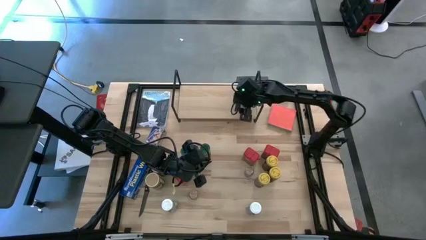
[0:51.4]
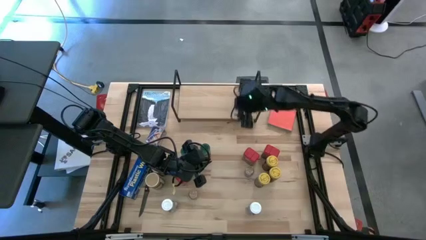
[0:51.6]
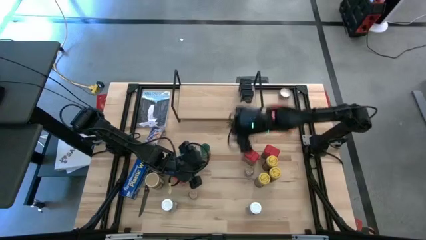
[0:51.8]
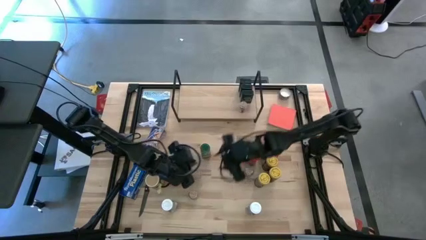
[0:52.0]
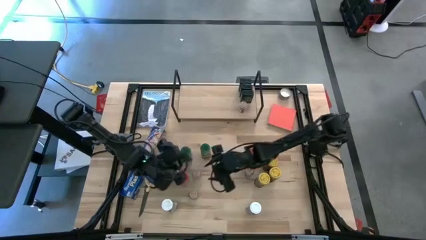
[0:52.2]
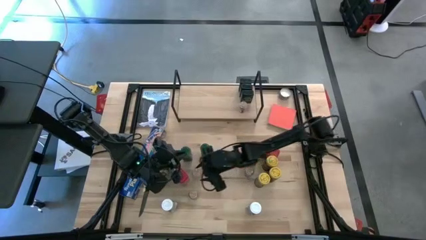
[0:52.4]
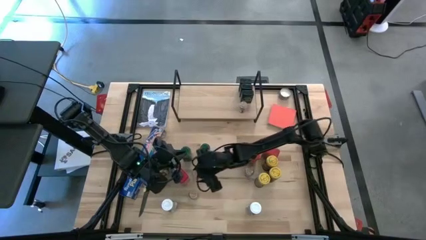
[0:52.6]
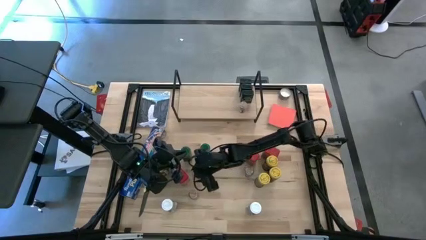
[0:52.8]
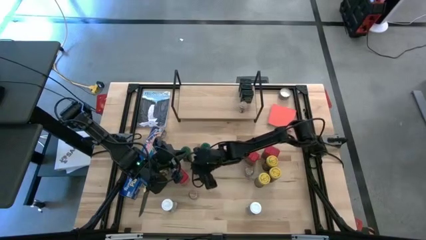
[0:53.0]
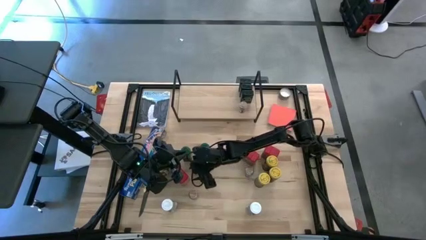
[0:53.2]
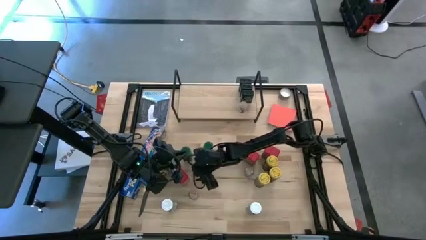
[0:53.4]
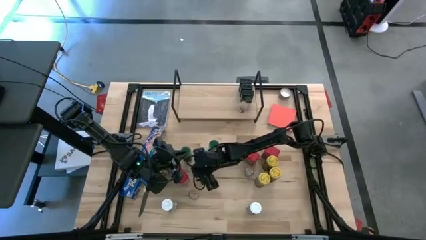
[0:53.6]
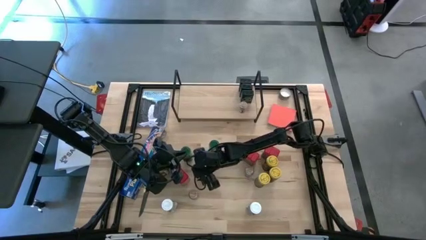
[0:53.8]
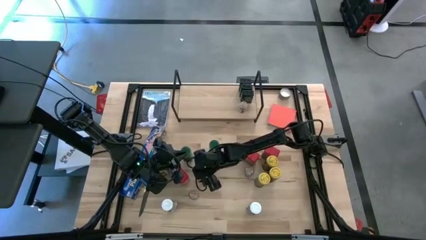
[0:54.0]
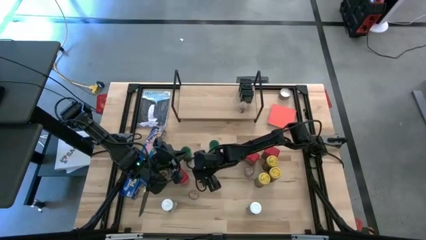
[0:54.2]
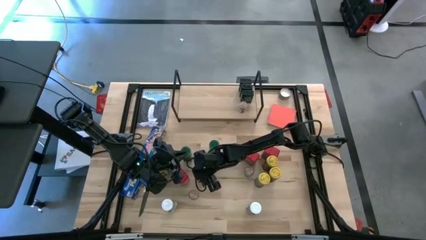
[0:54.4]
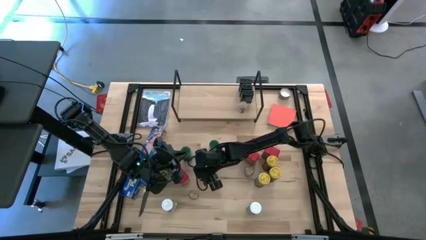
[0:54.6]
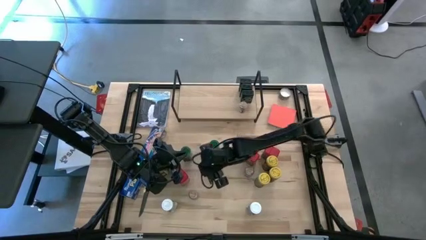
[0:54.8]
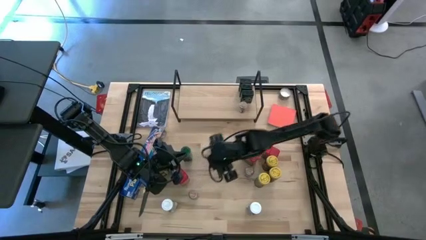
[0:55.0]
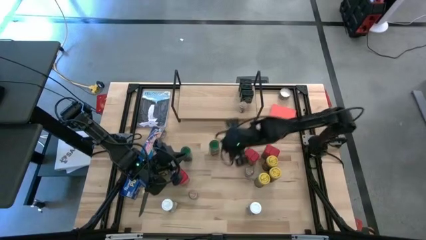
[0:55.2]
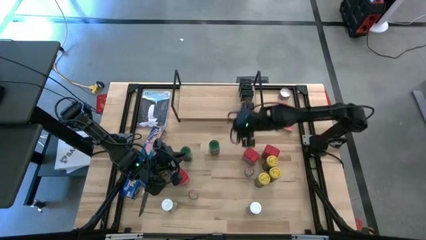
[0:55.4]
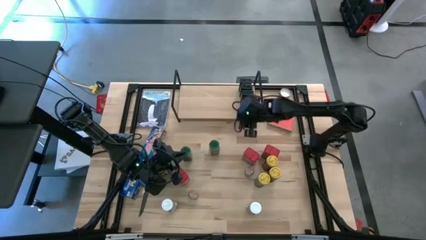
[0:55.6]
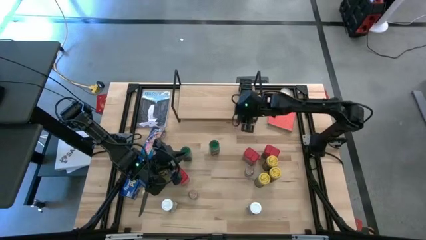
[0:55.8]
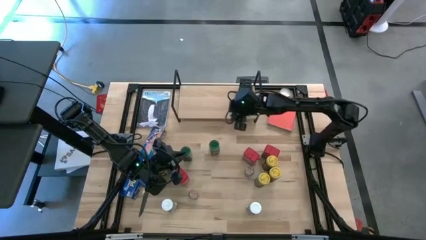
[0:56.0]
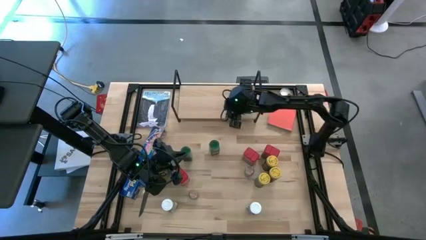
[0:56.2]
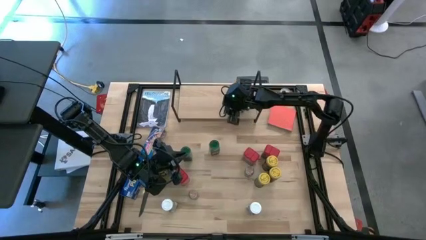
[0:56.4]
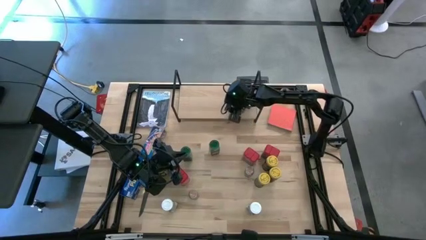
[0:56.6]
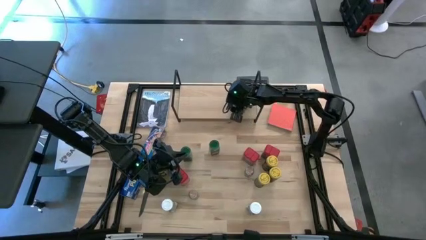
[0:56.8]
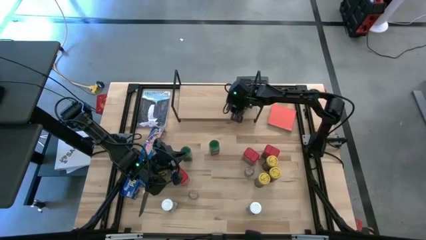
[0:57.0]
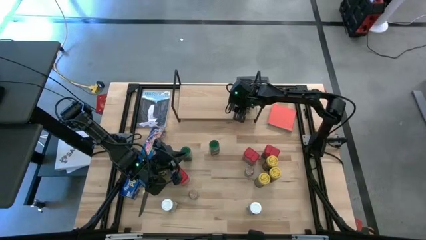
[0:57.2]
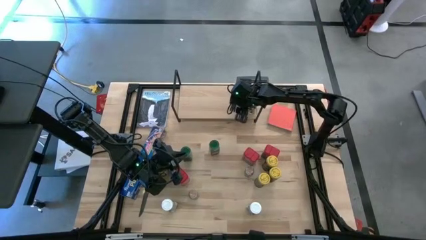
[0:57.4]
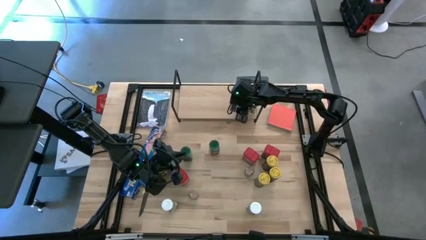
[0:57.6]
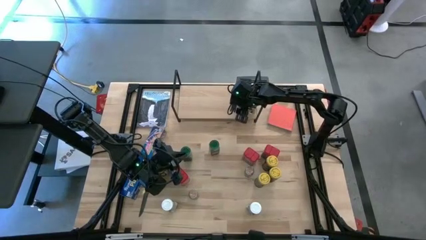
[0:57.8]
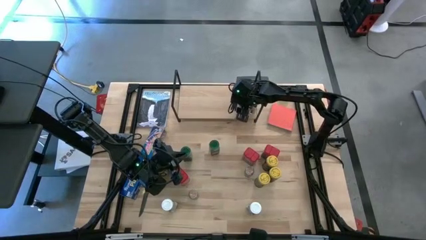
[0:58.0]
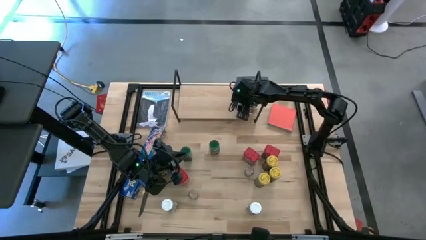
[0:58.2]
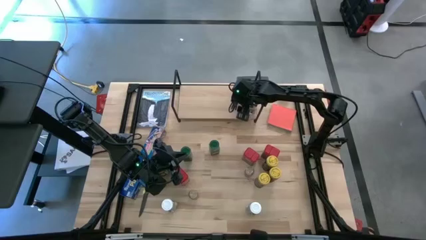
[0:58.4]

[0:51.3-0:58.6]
Task: Shelf spices
Put the transparent seasoning bottle on the shelf

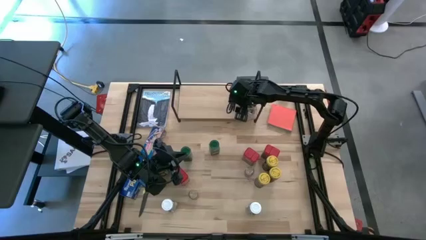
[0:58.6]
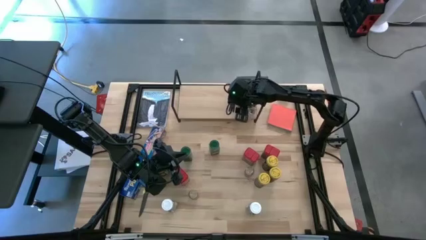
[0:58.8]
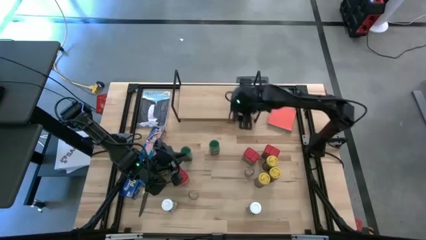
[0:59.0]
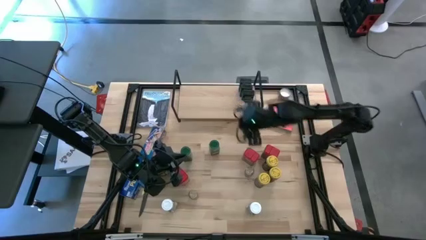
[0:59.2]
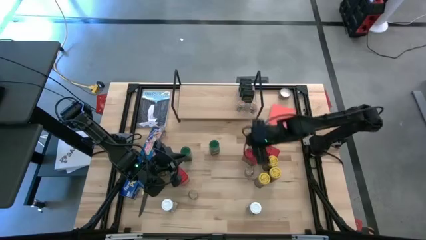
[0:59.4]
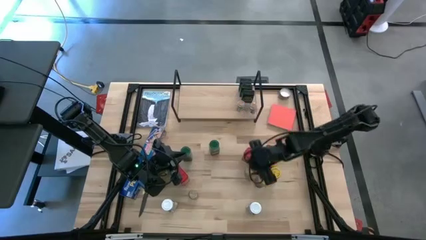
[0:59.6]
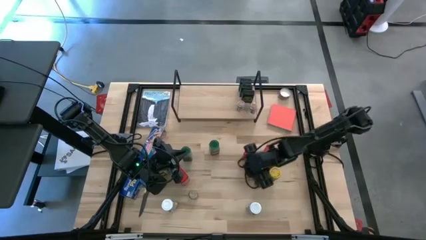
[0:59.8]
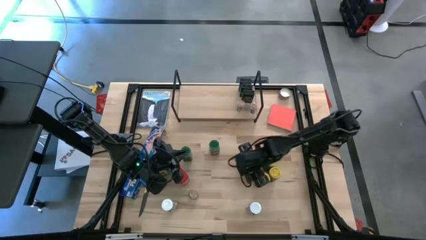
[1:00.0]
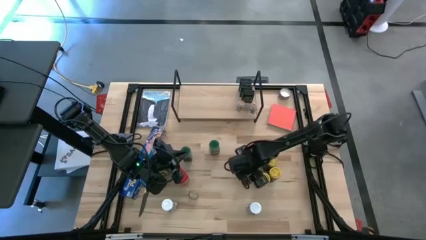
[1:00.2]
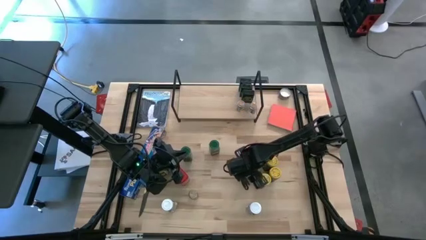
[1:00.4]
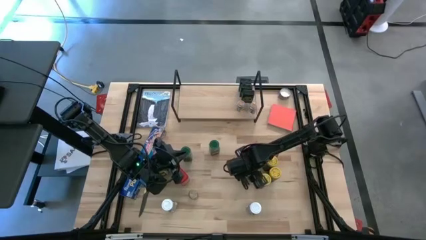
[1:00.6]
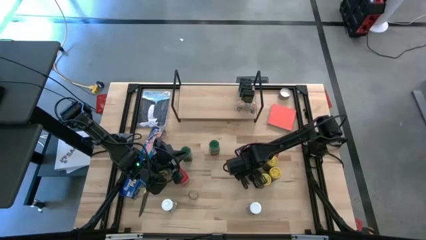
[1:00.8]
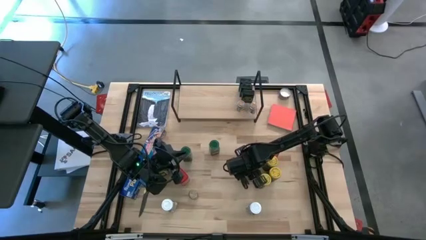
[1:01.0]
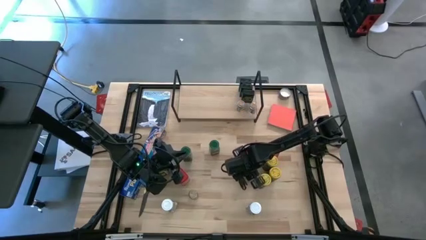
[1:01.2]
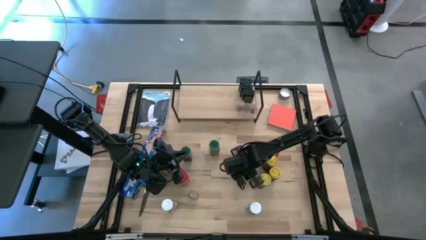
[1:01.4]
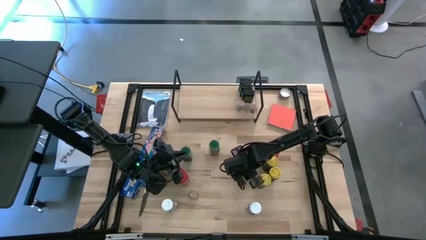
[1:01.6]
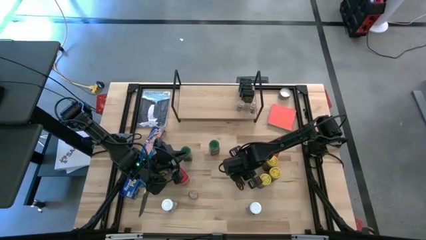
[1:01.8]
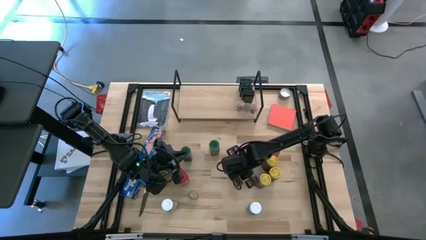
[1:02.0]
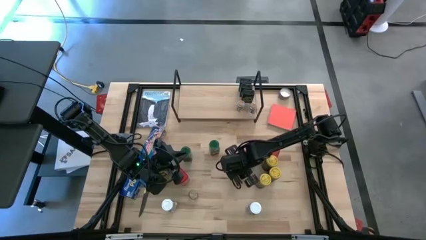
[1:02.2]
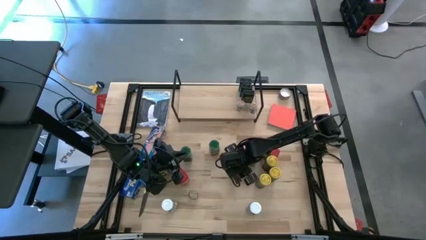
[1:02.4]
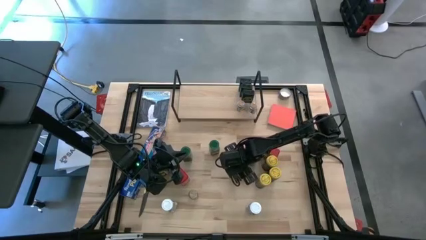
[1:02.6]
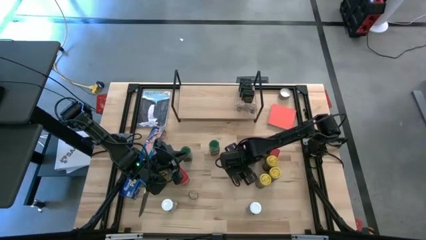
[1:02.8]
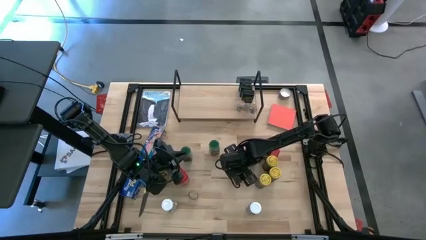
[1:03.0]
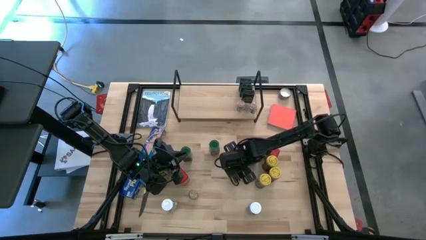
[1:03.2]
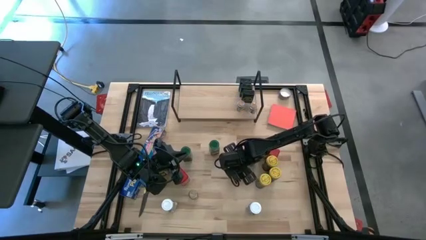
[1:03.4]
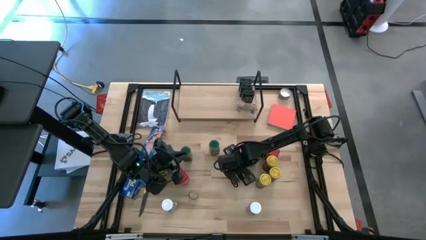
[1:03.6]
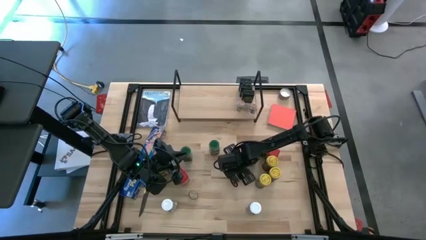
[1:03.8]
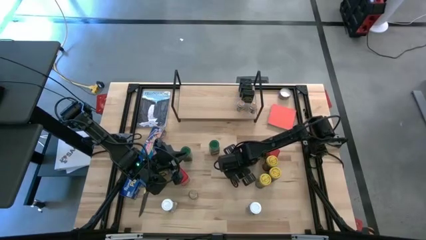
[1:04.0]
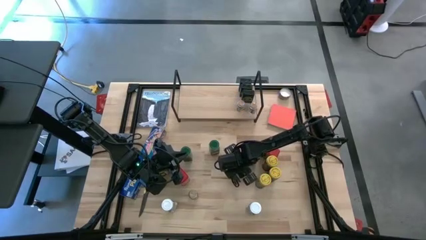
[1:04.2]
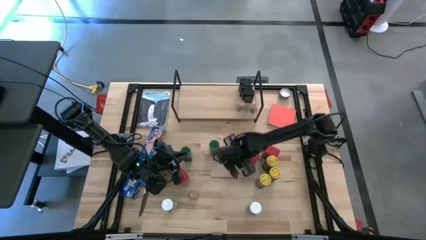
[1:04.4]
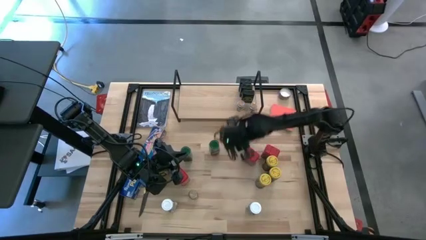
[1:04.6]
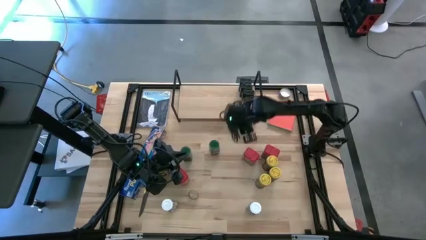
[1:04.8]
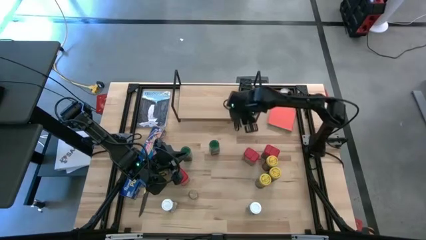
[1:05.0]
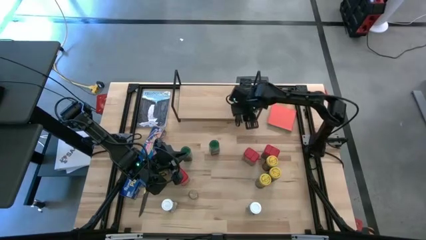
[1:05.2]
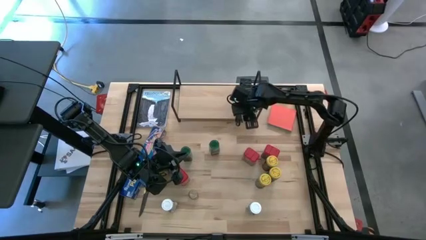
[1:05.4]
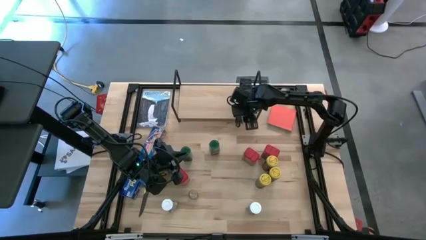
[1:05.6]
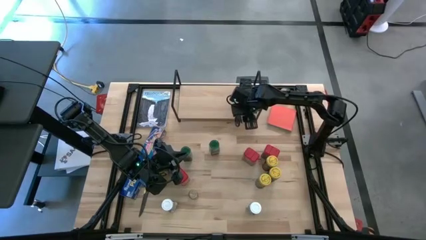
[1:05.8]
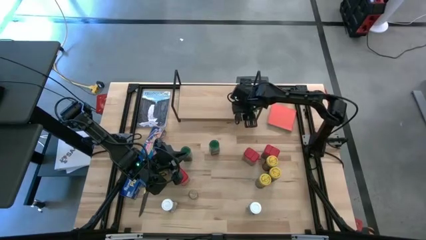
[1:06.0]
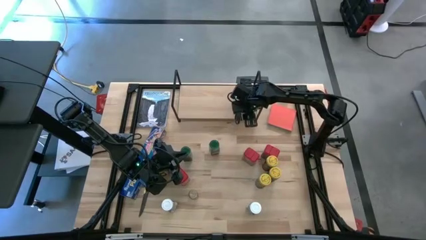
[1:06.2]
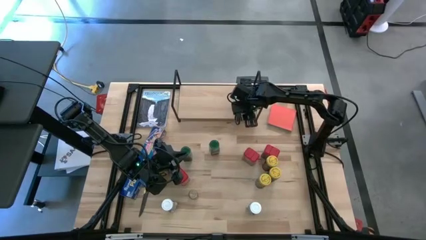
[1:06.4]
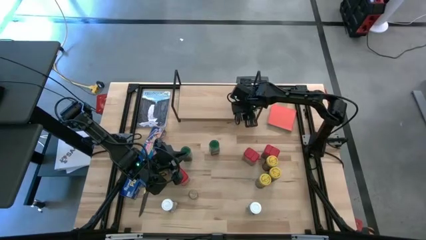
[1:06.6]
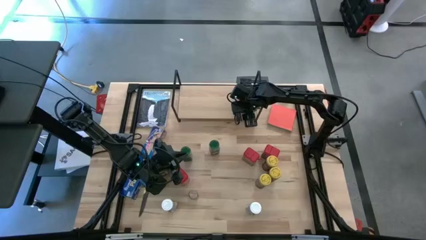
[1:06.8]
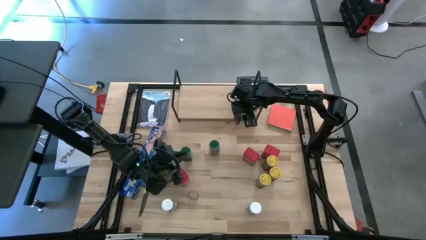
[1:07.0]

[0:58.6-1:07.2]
Put the transparent seasoning bottle on the shelf aligned with the transparent seasoning can
